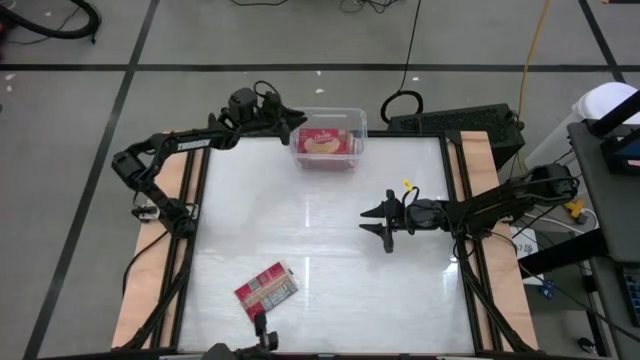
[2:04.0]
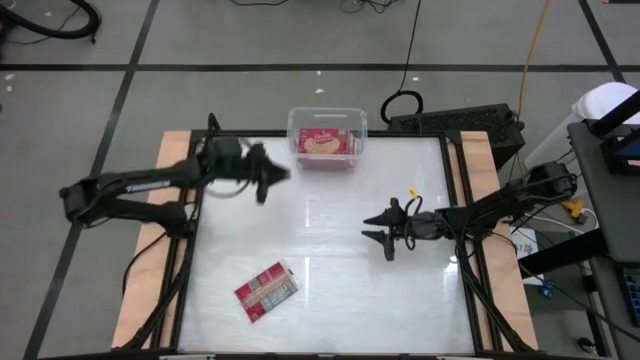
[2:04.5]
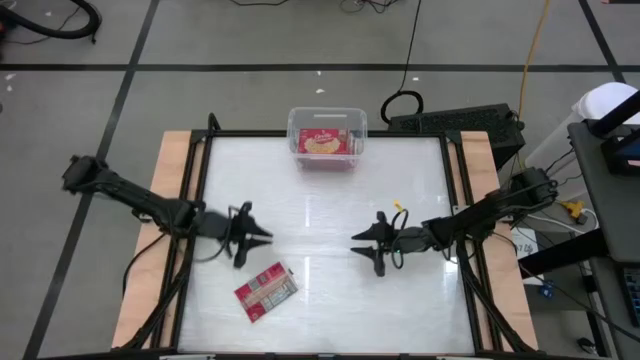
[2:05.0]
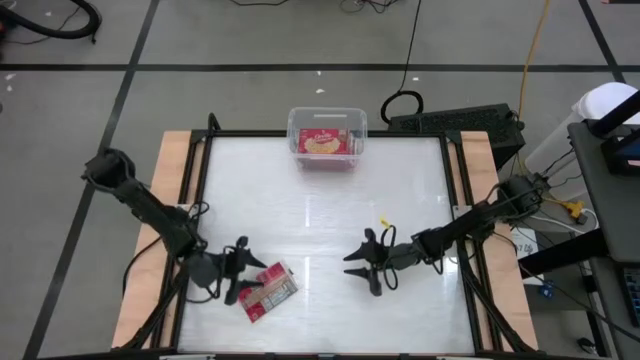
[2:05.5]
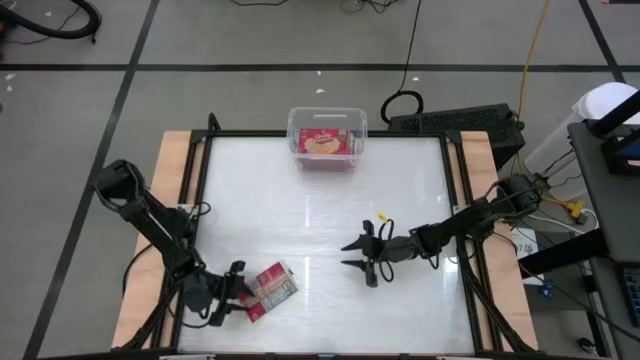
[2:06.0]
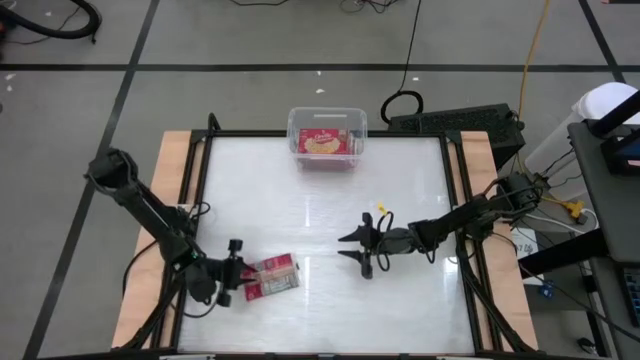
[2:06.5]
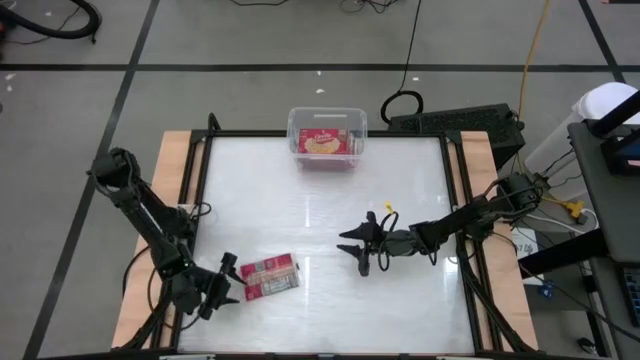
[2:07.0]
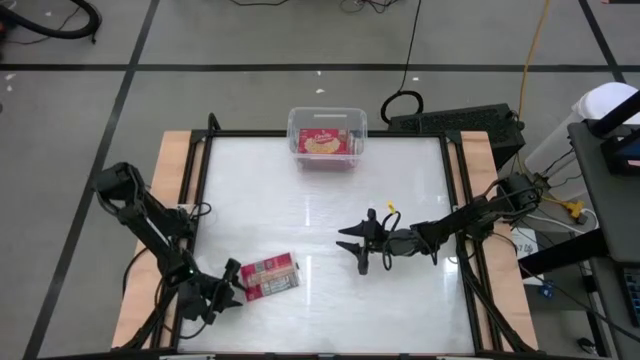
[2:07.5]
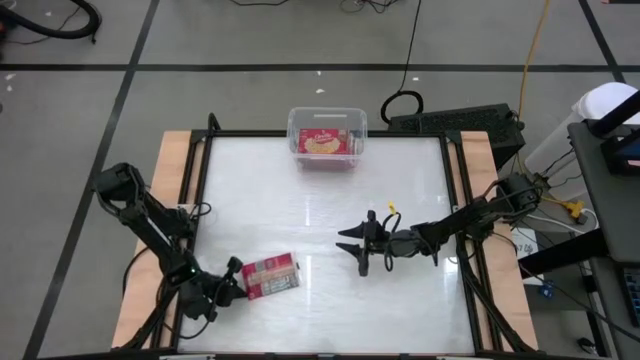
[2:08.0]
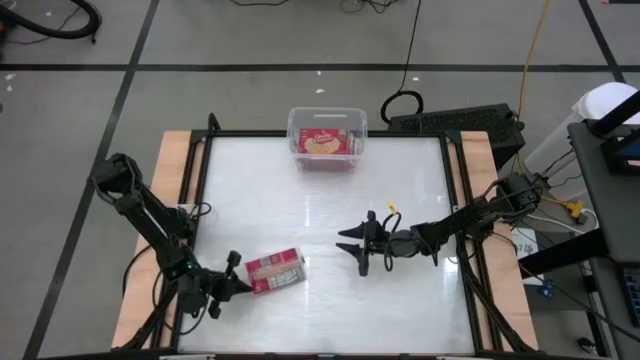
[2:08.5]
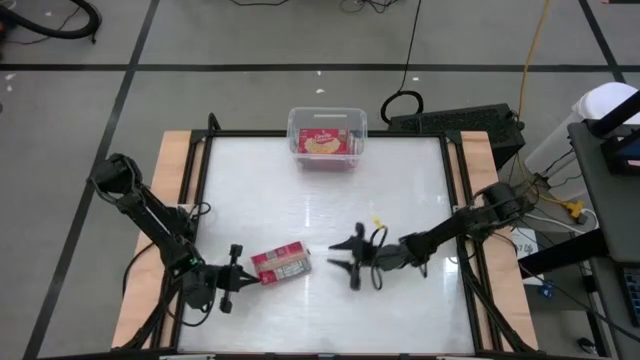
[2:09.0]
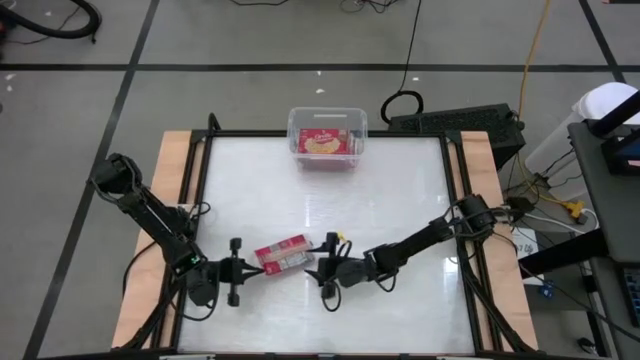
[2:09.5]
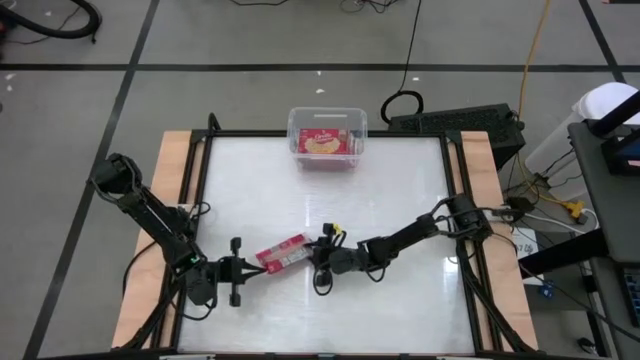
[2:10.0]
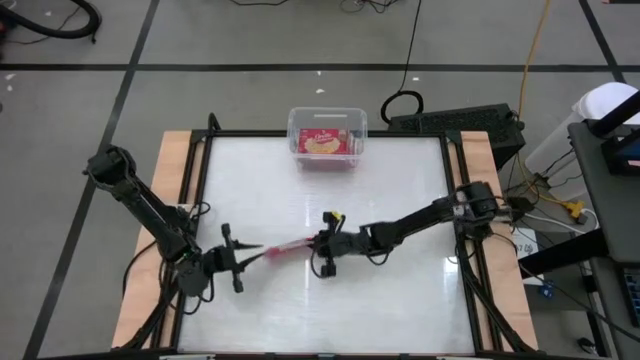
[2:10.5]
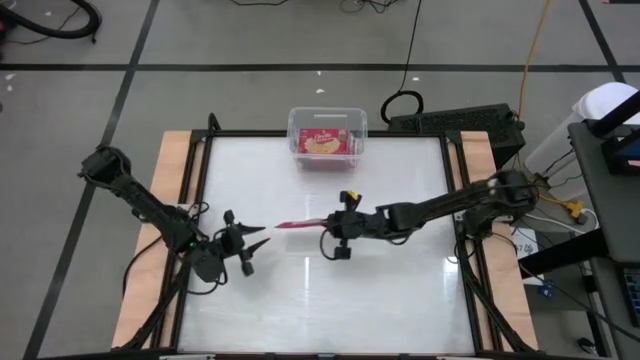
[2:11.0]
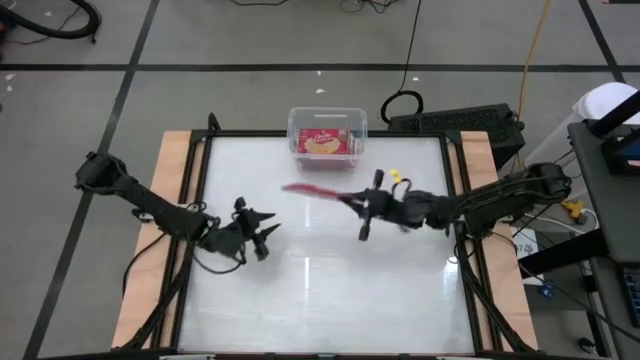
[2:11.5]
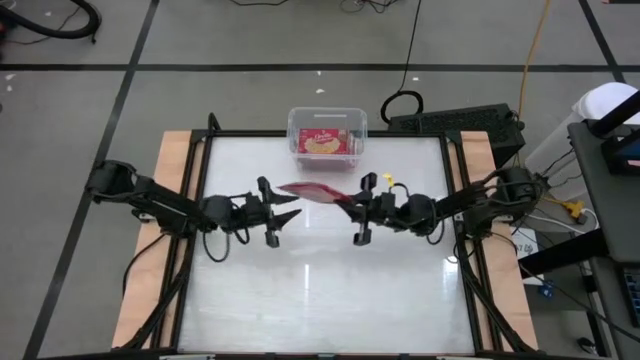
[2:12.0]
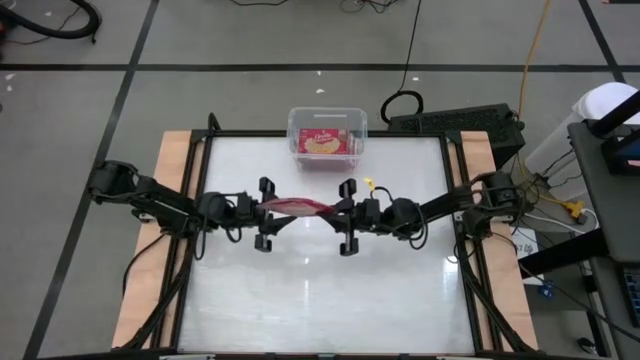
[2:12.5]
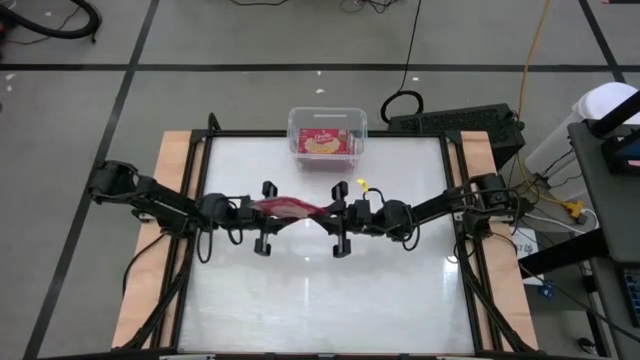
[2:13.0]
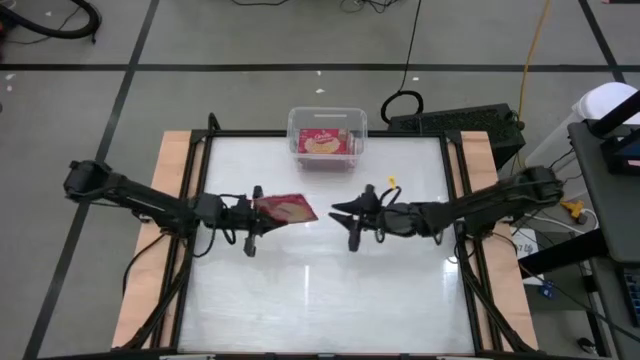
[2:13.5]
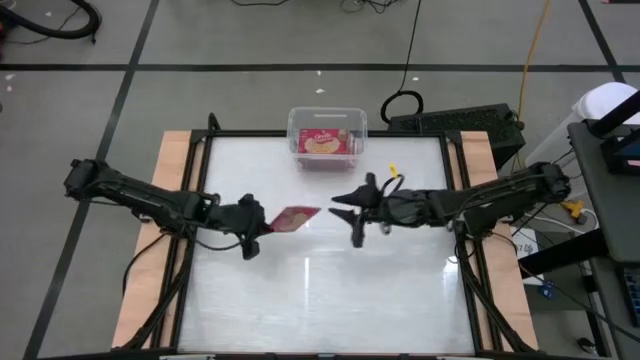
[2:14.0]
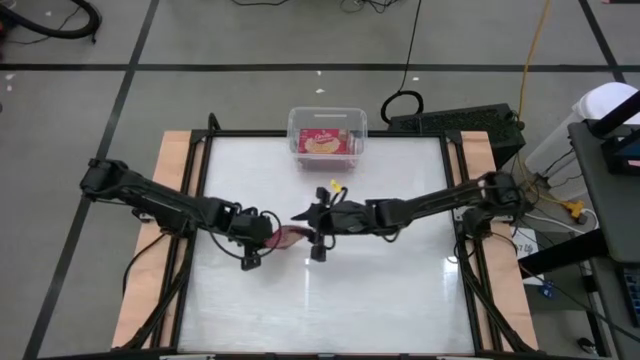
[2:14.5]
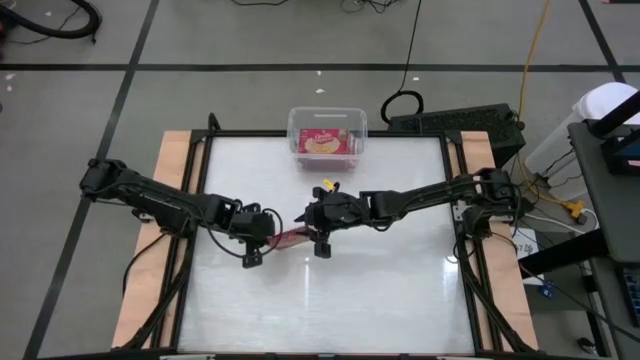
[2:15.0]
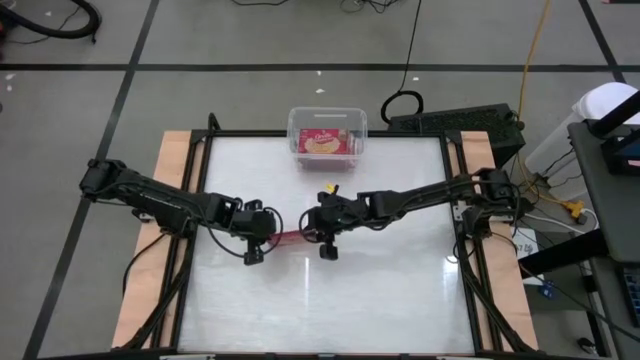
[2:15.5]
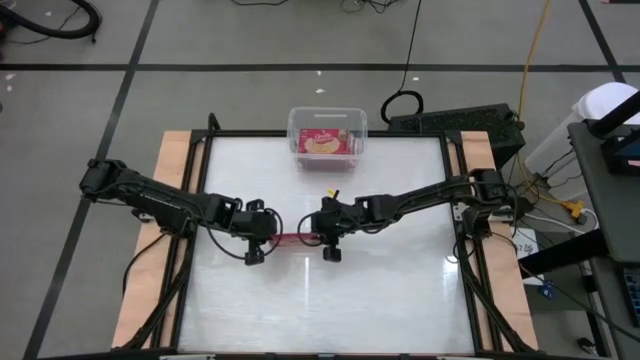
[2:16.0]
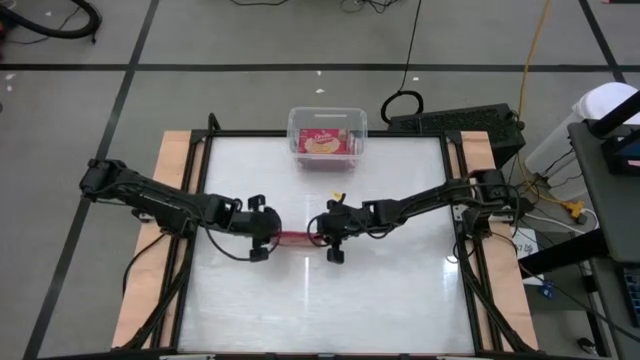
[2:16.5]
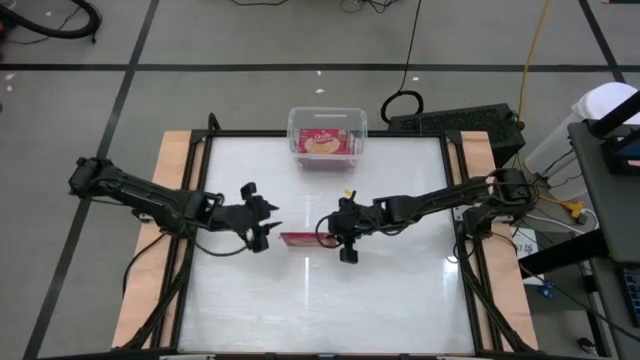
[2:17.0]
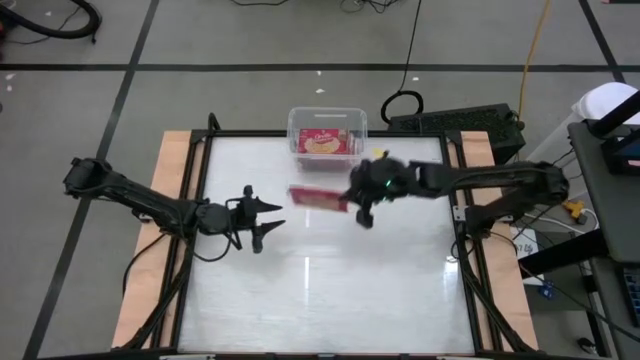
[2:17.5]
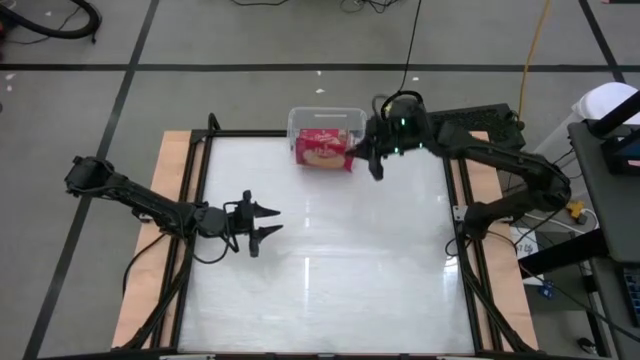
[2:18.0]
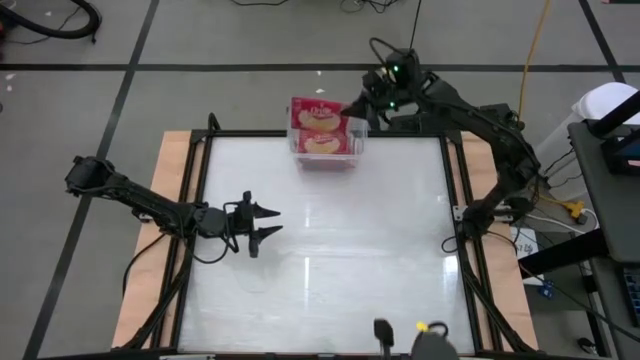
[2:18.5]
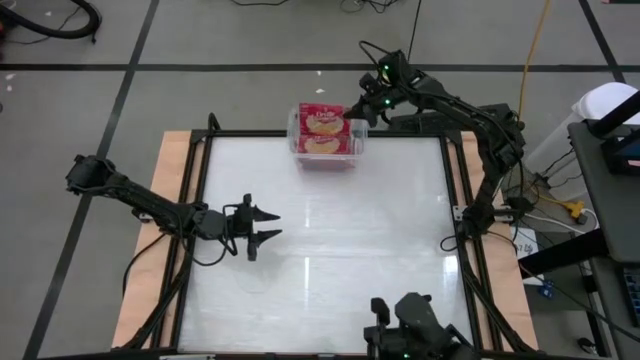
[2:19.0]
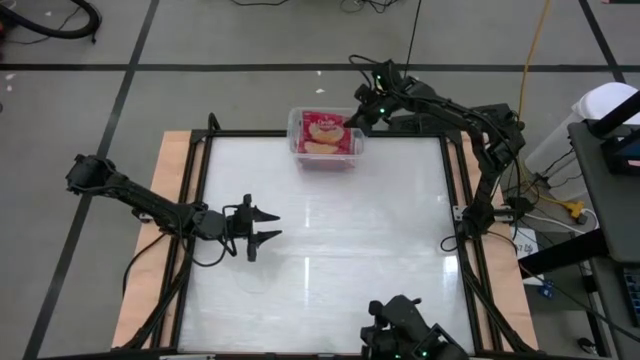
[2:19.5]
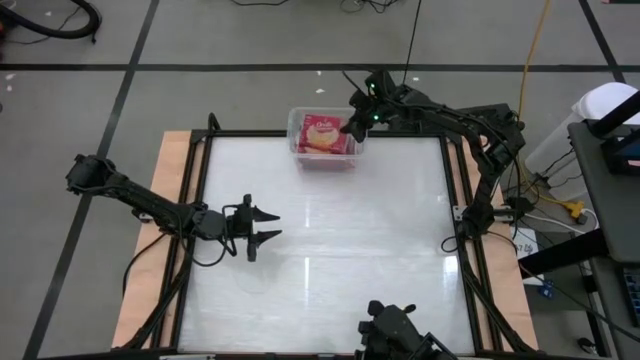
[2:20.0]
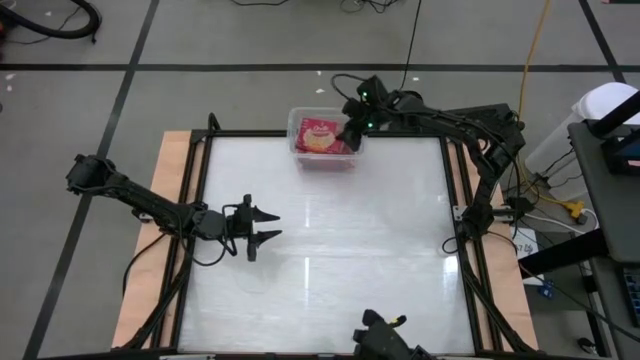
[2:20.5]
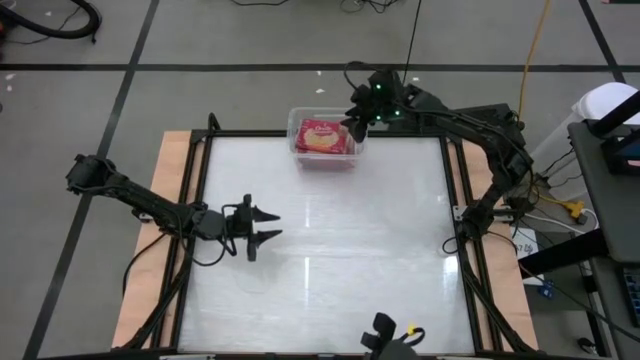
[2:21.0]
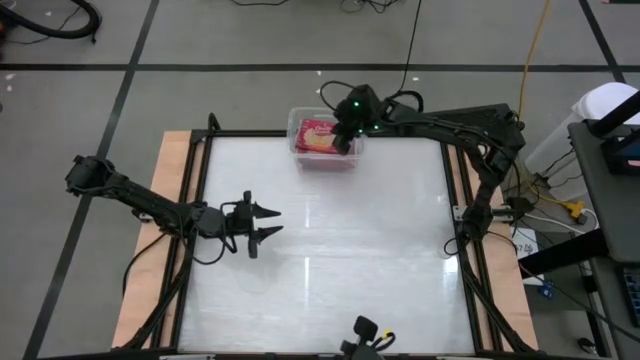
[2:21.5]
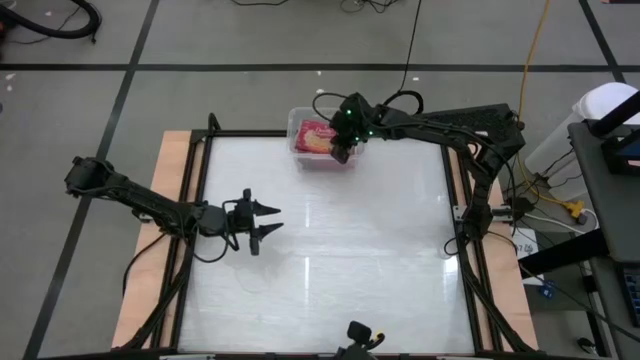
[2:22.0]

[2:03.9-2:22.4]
Task: Sort popcorn bags into baskets
Put the popcorn bag into the transparent bin

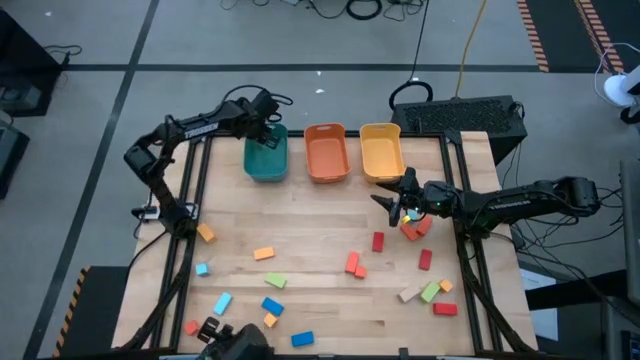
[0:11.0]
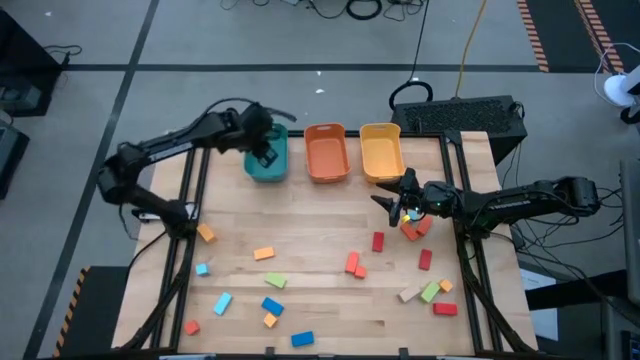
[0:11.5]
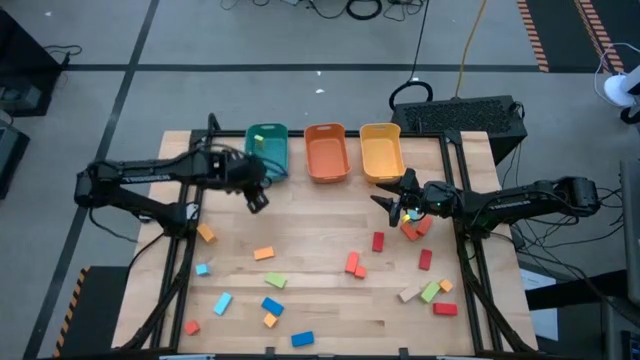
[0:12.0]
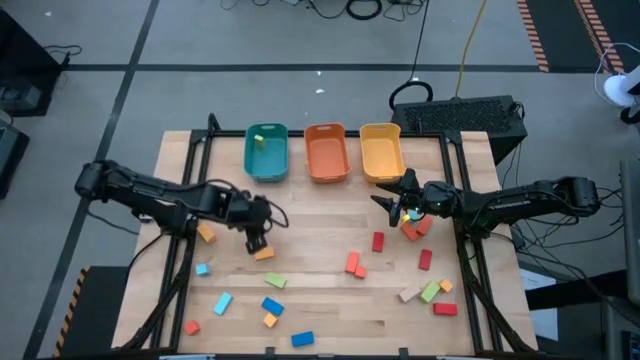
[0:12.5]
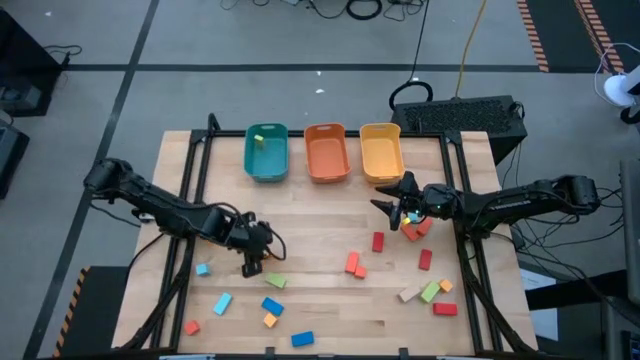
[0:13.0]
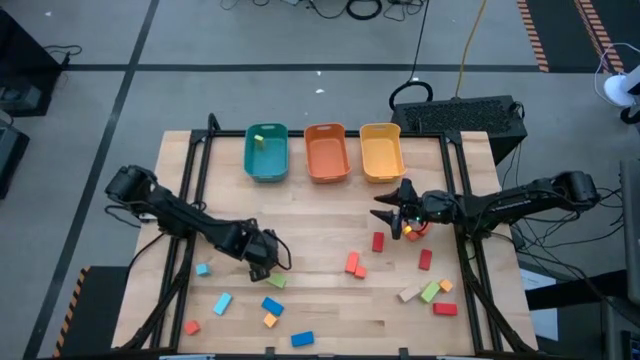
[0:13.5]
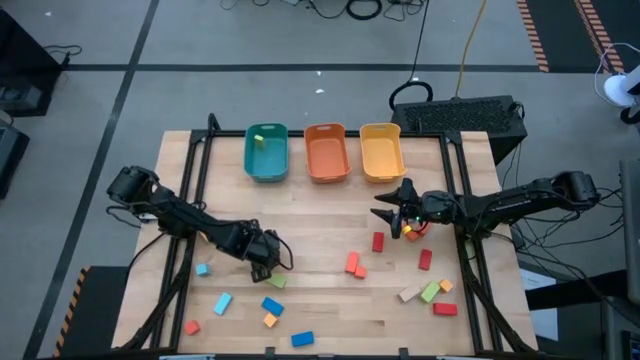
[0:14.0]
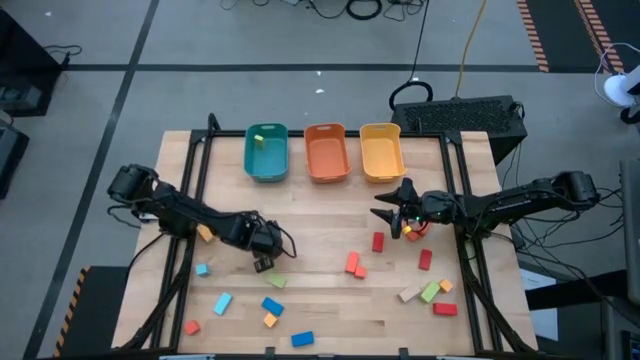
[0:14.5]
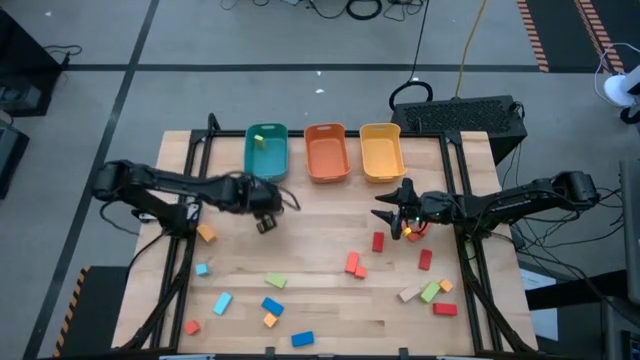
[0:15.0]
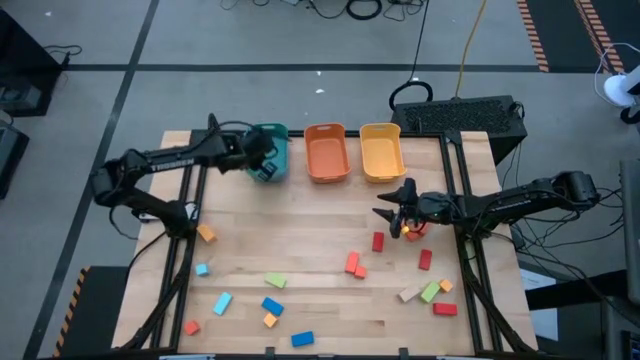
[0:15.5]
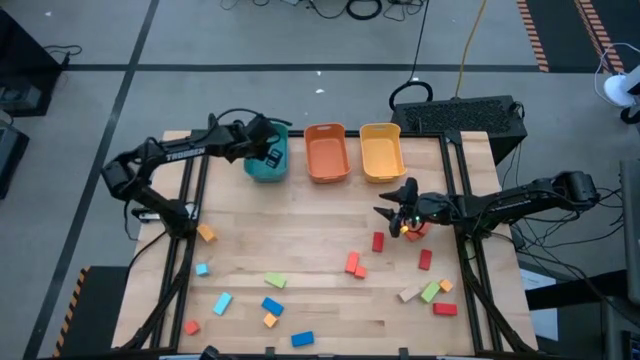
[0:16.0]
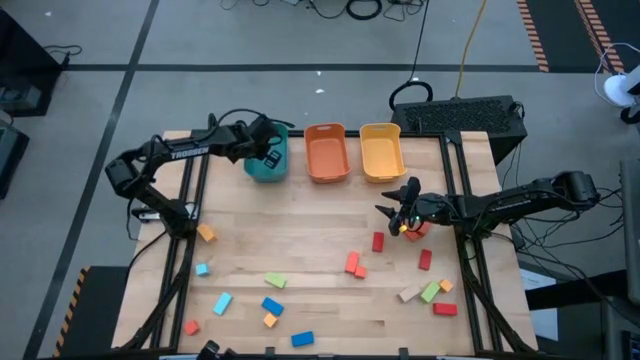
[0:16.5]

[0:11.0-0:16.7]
Task: Sort blocks by size
Put the yellow thin rectangular block into the blue bin
